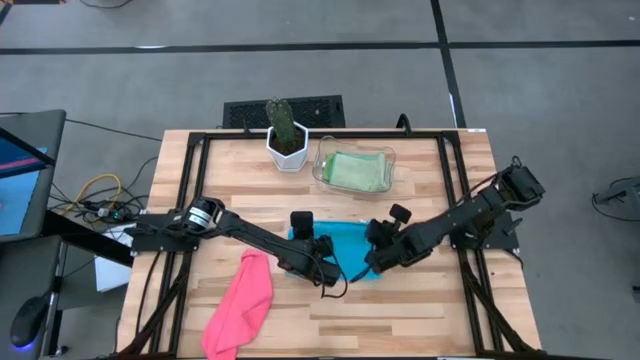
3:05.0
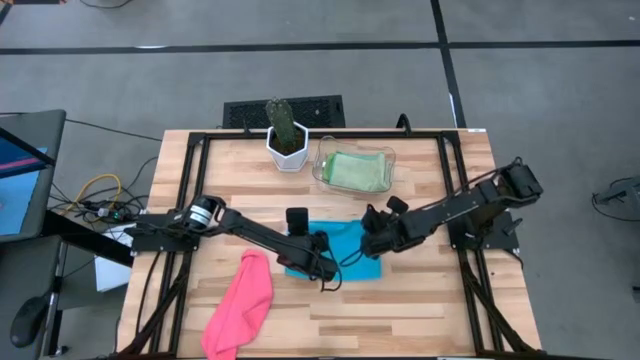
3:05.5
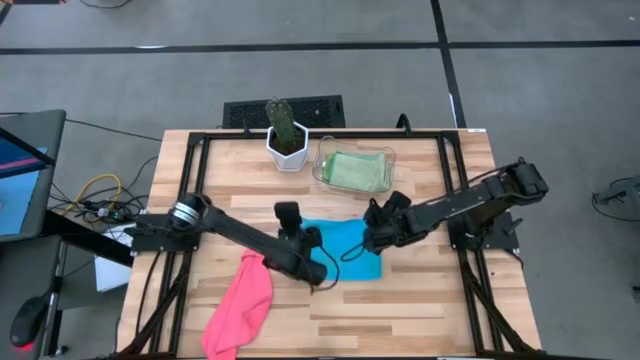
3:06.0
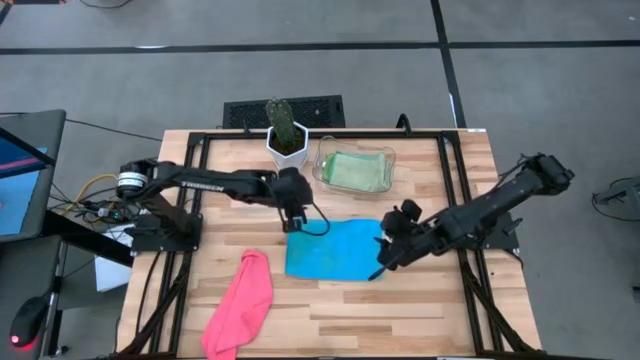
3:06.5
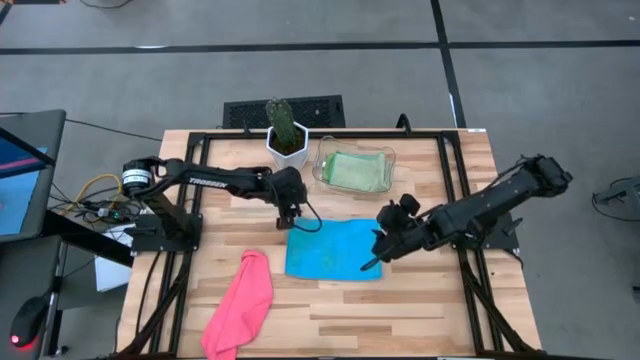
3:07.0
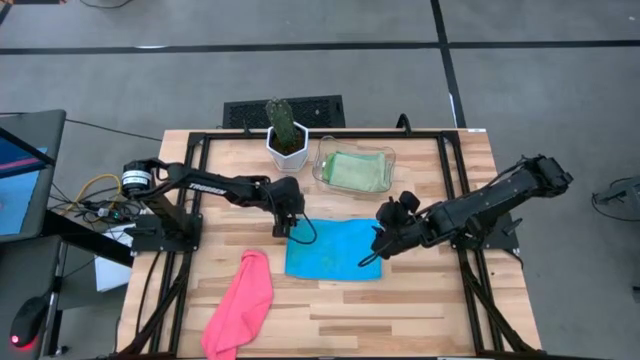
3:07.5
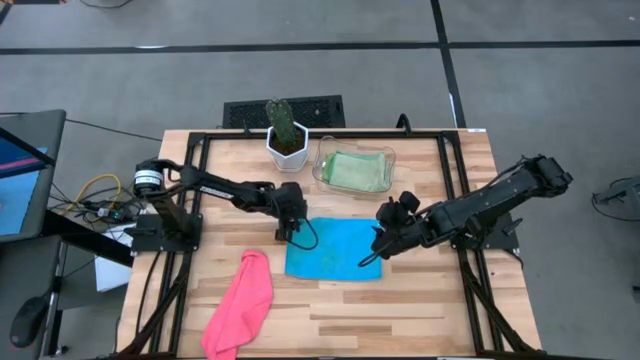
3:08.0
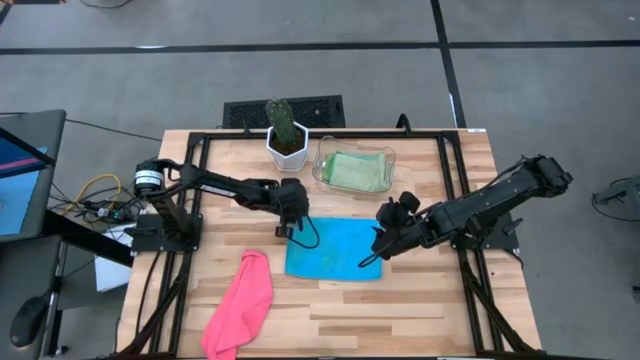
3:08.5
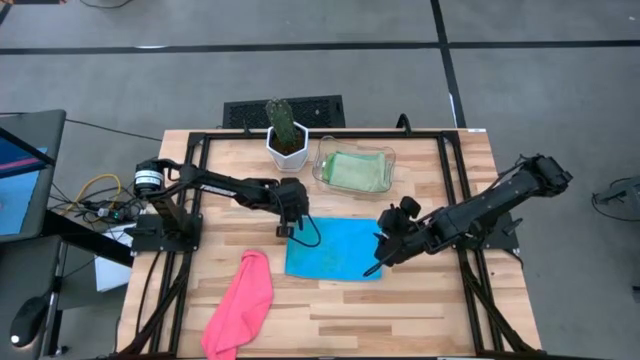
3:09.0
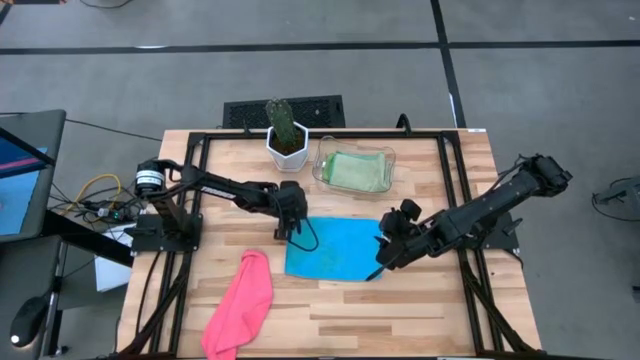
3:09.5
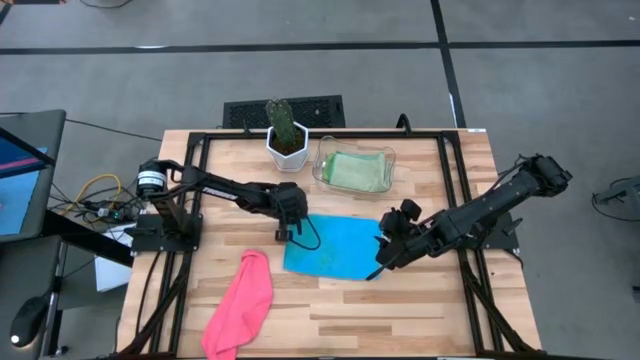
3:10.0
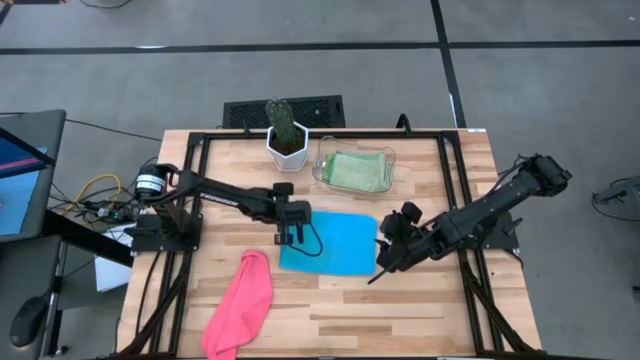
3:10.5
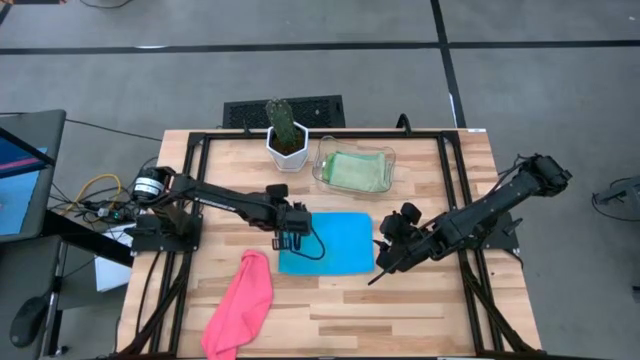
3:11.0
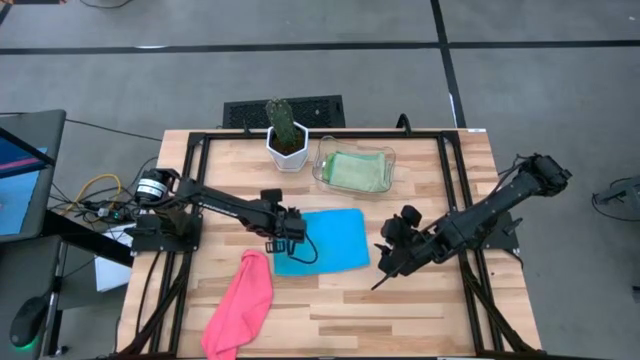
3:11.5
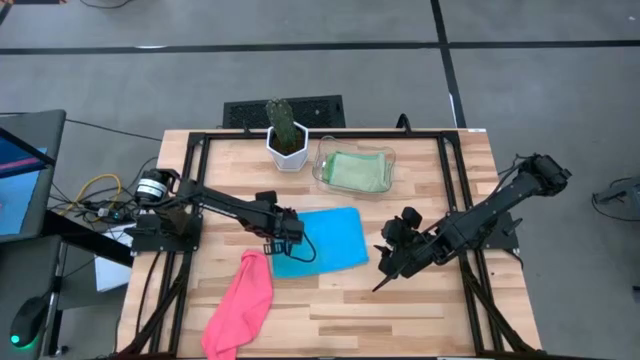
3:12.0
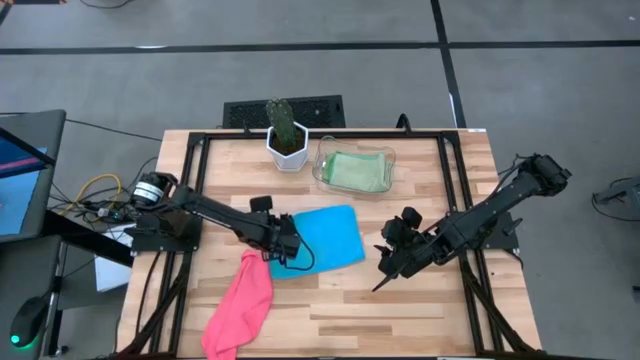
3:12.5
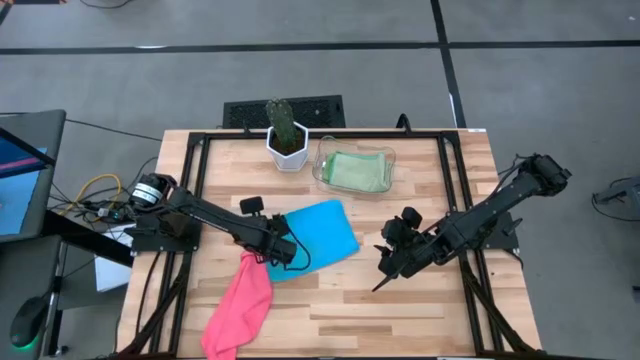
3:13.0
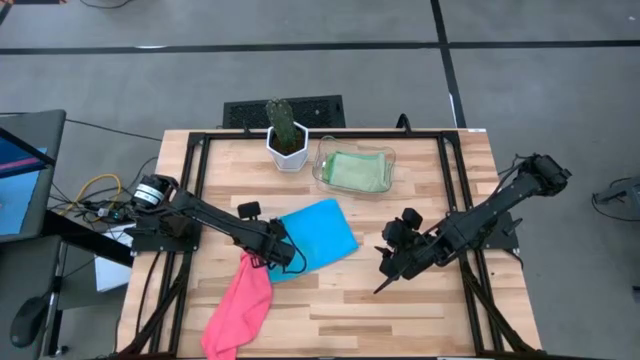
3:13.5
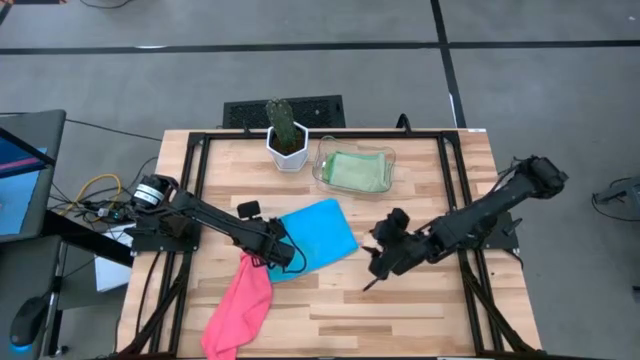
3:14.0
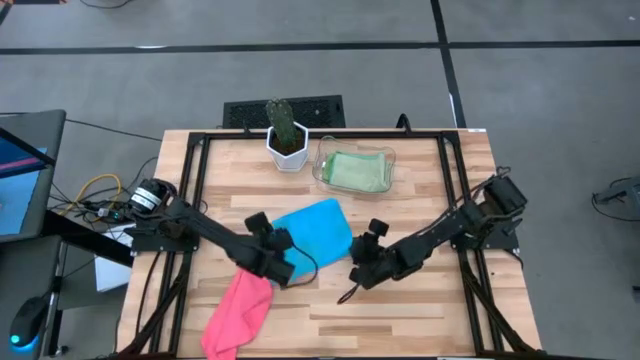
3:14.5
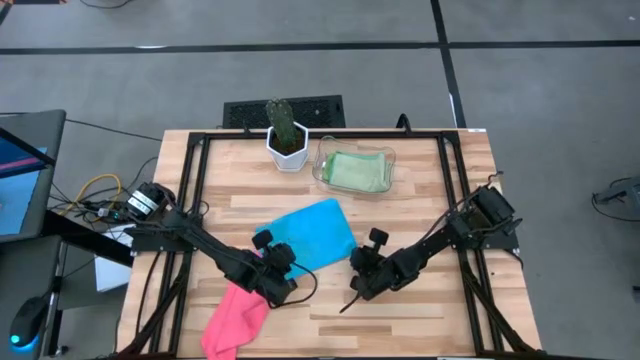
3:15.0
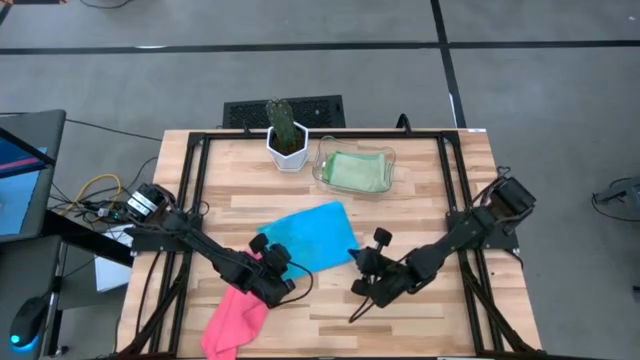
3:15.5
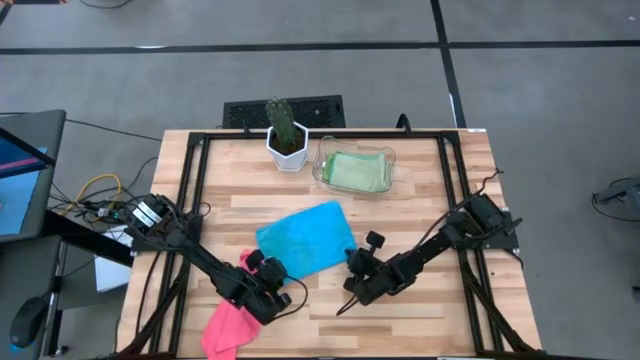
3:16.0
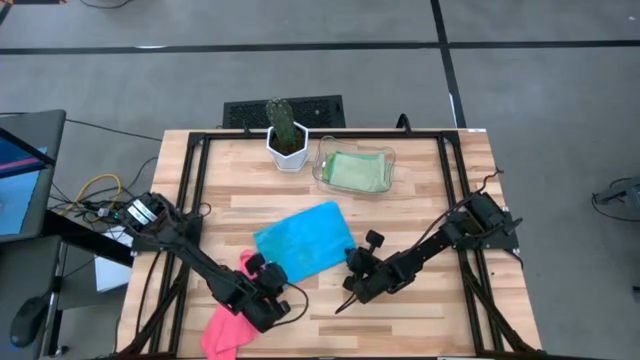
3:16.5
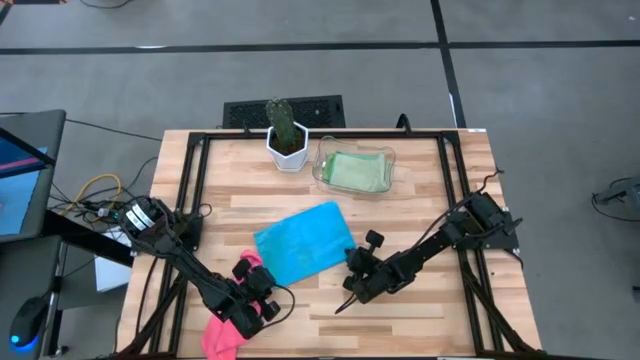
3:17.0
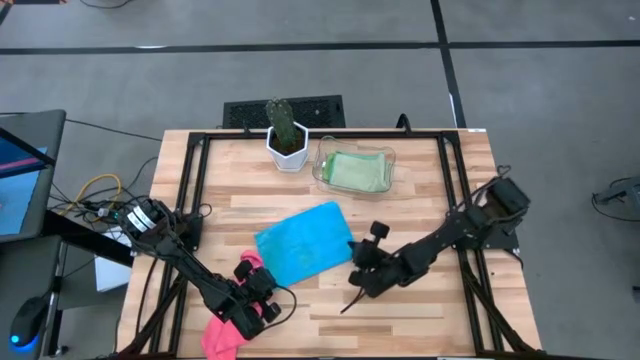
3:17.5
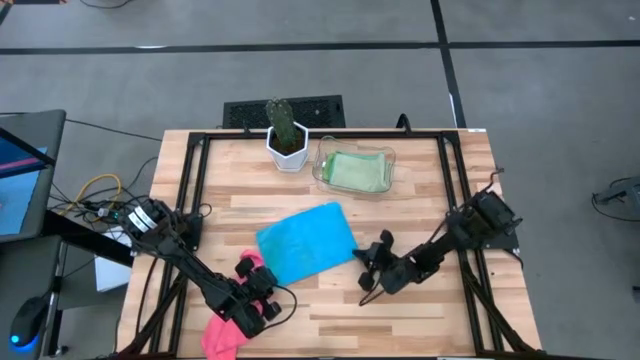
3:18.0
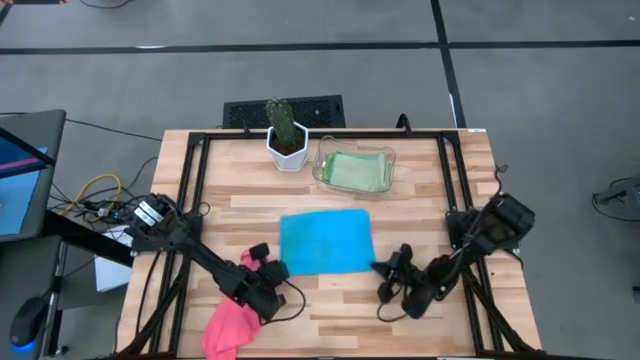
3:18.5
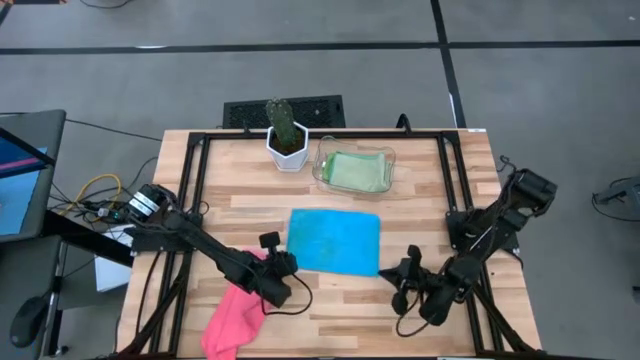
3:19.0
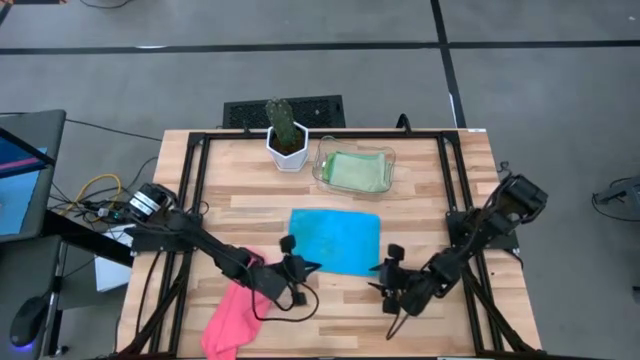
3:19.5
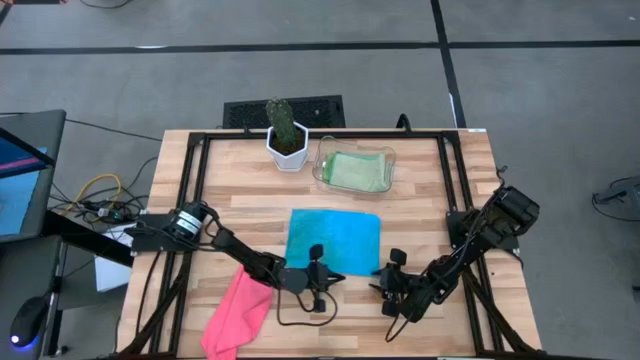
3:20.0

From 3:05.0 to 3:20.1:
Task: Fold microfiber towels
Fold the blue towel on the table

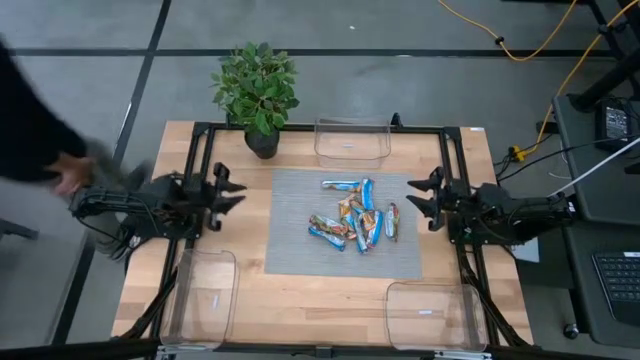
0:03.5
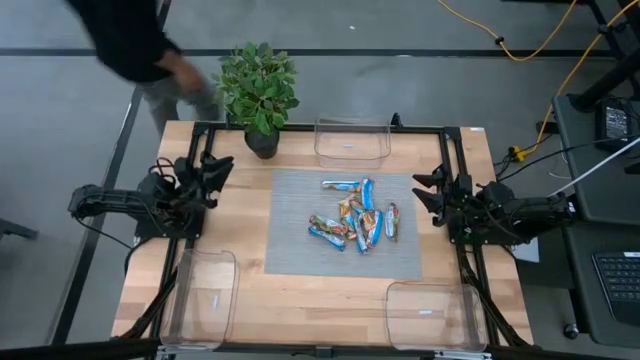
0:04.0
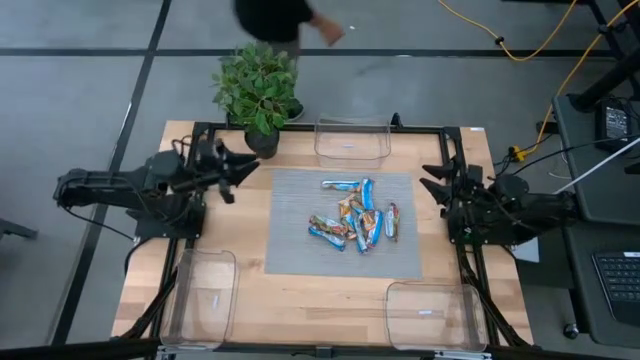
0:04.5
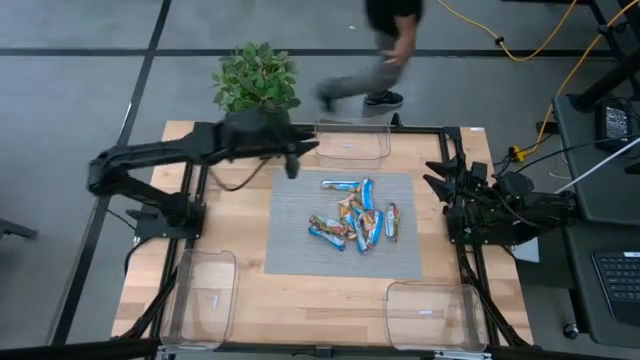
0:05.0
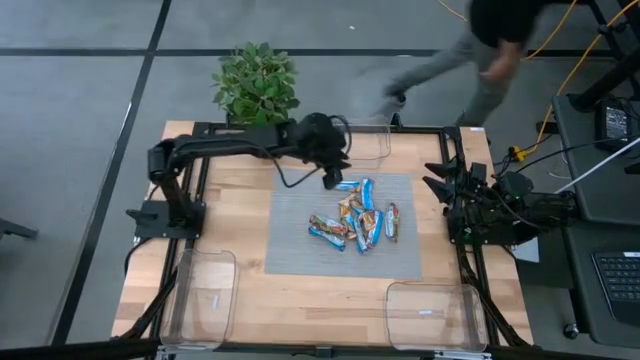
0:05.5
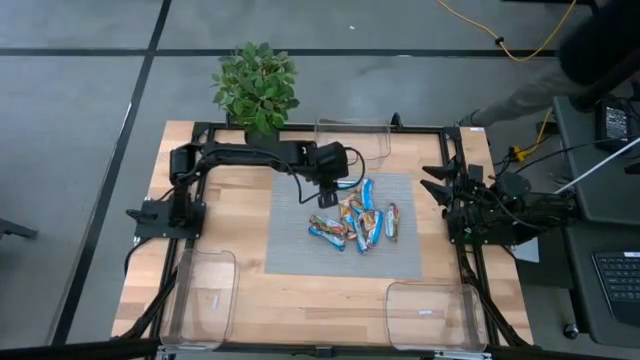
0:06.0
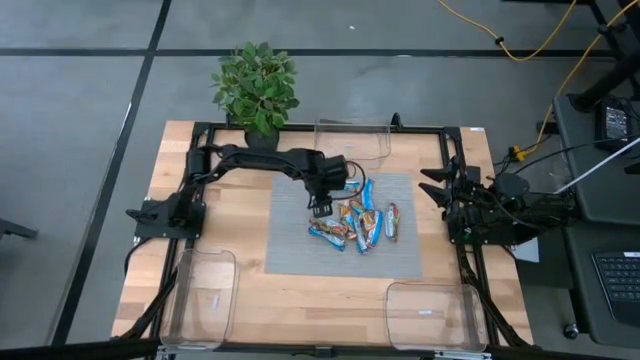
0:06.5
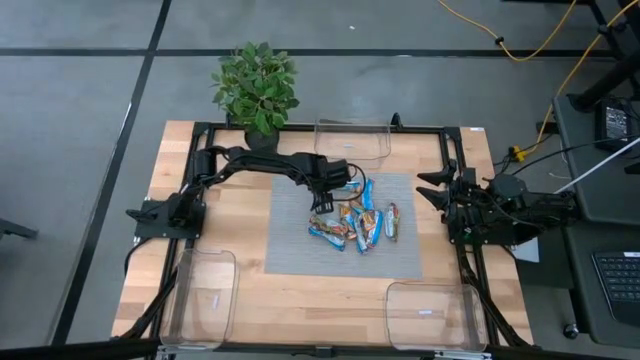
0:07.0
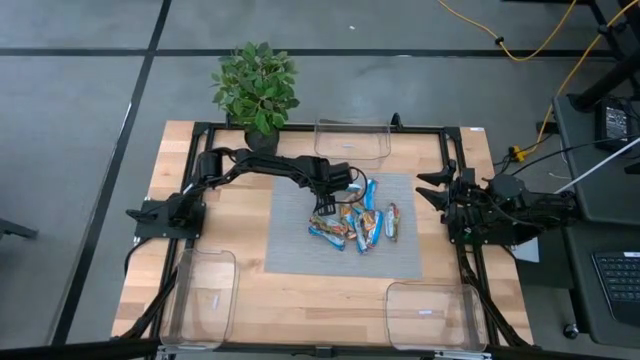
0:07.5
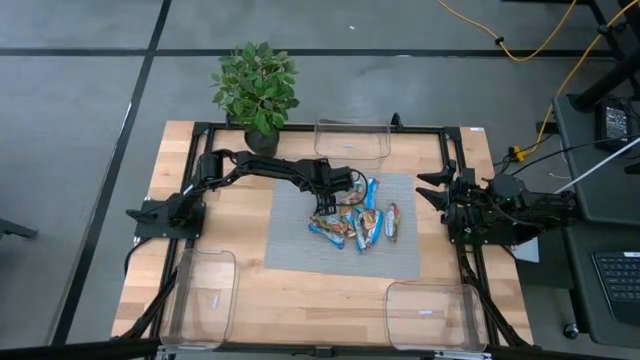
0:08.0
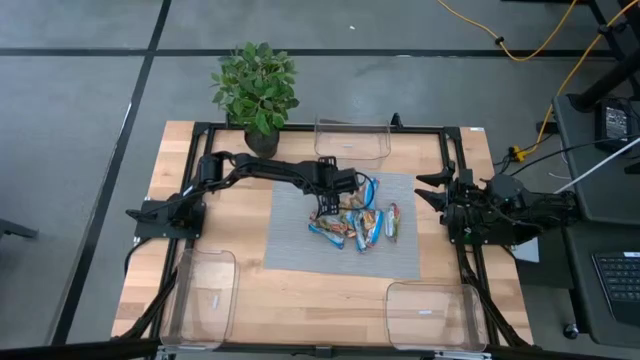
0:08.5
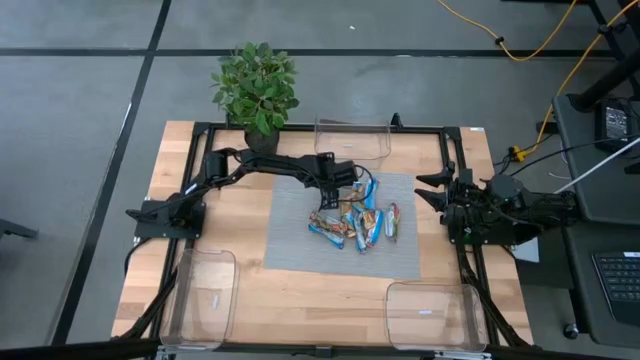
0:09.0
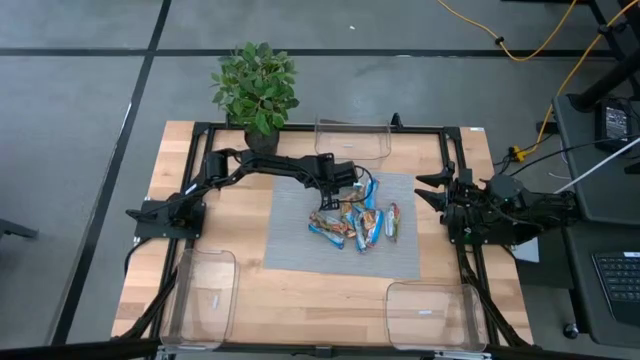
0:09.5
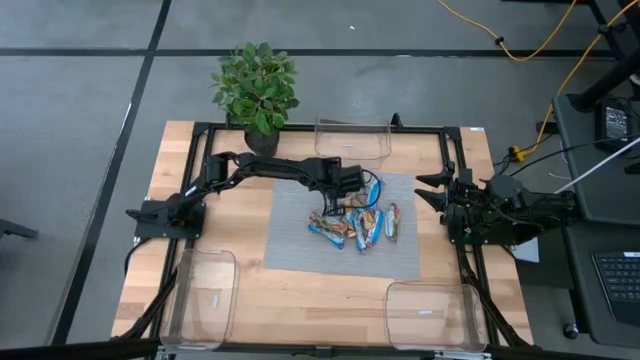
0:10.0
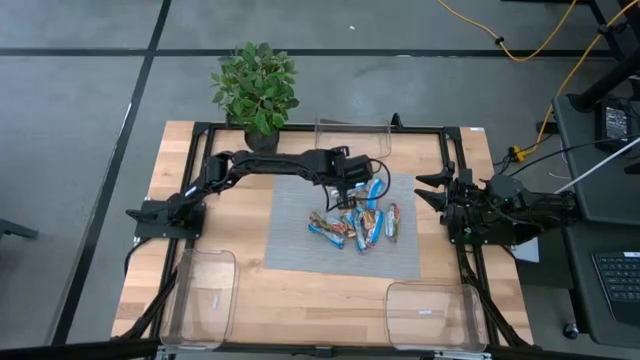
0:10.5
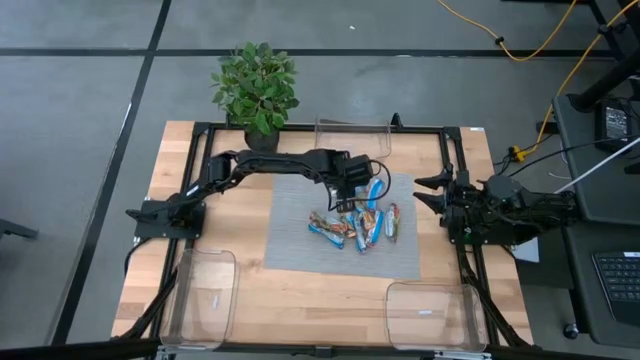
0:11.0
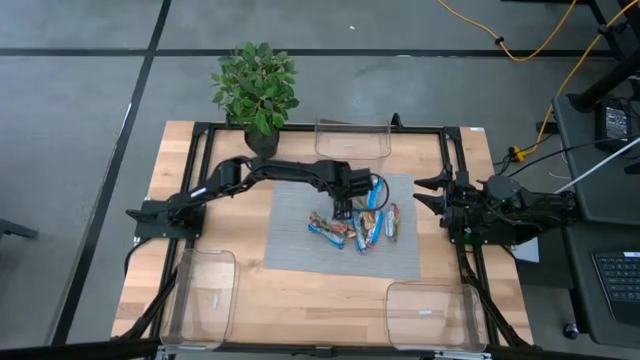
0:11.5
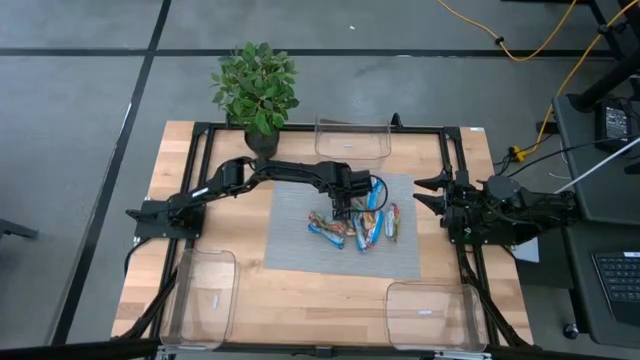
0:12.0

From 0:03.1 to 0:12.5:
Task: Pick and place Granola Bars by type
Put the yellow granola bar into the top transparent bin
